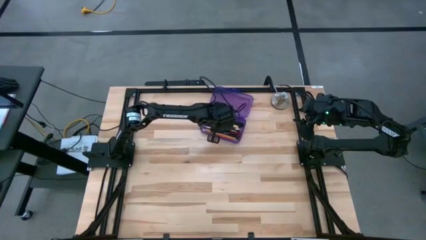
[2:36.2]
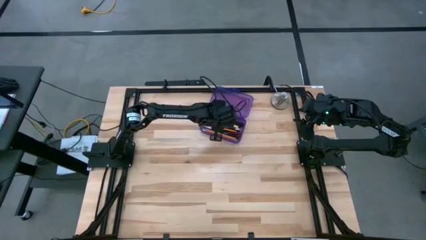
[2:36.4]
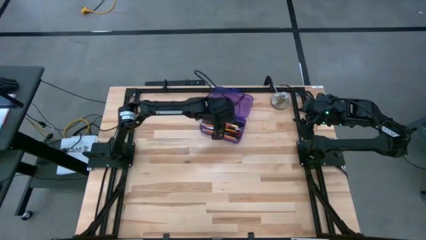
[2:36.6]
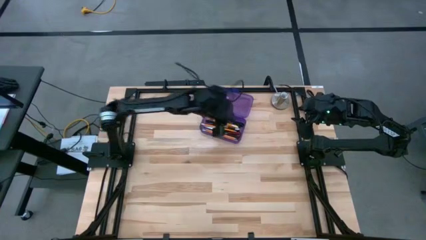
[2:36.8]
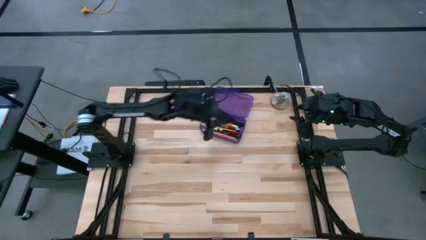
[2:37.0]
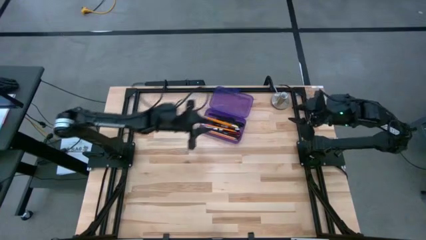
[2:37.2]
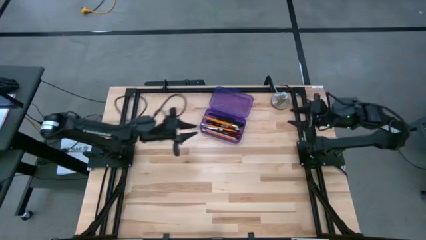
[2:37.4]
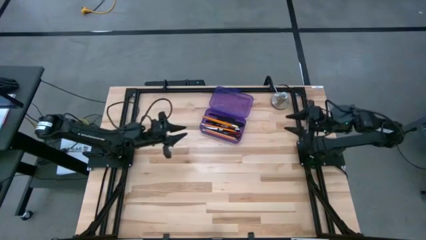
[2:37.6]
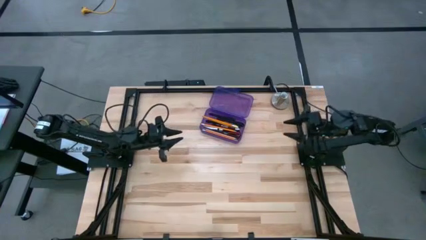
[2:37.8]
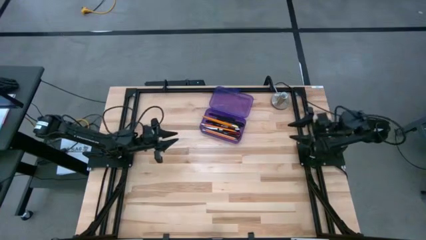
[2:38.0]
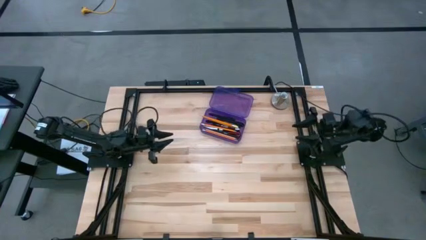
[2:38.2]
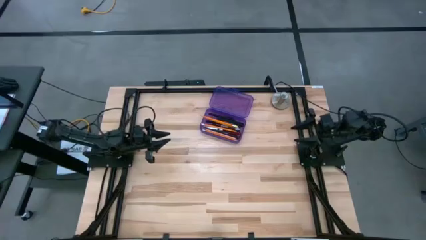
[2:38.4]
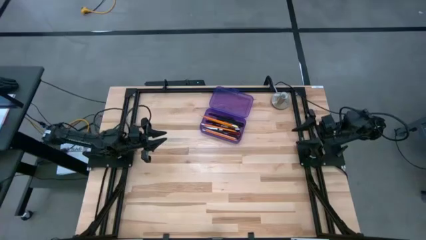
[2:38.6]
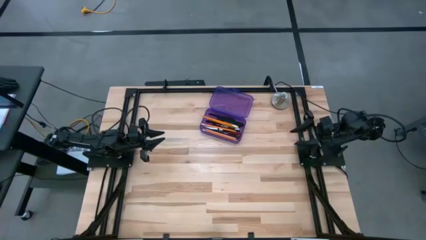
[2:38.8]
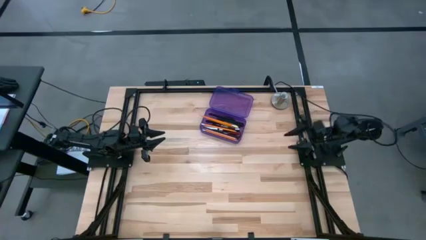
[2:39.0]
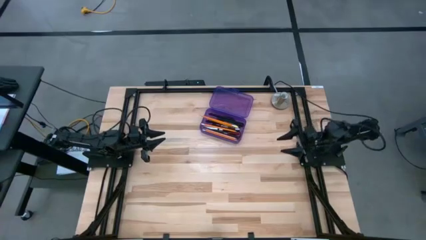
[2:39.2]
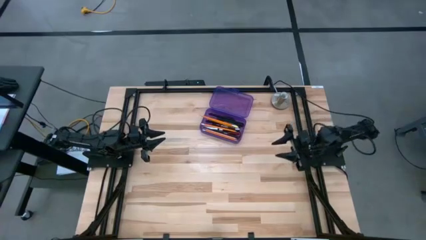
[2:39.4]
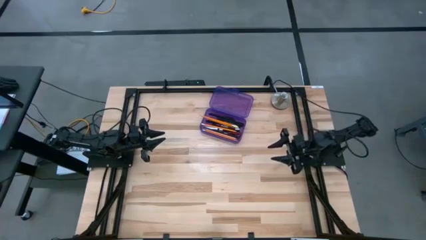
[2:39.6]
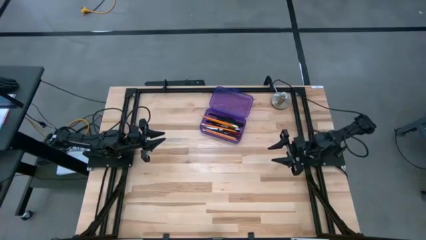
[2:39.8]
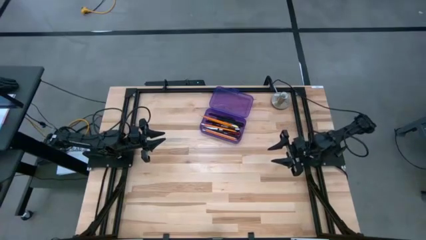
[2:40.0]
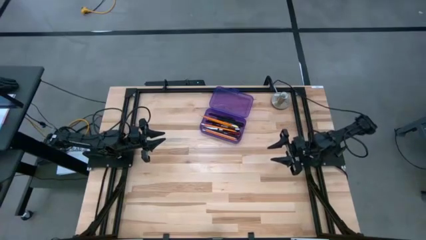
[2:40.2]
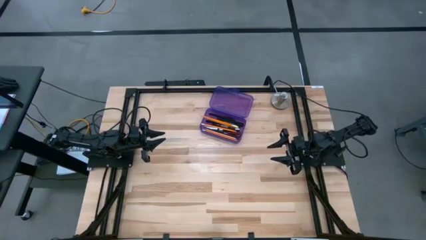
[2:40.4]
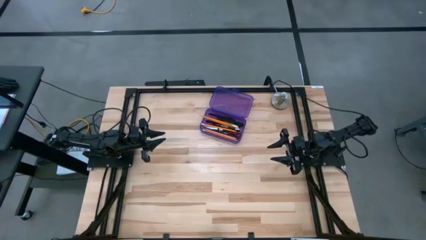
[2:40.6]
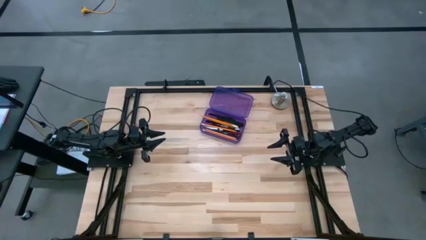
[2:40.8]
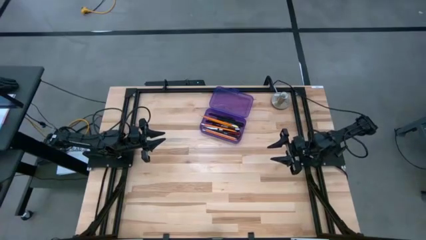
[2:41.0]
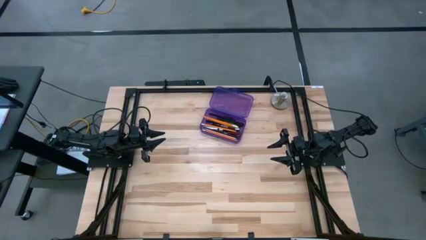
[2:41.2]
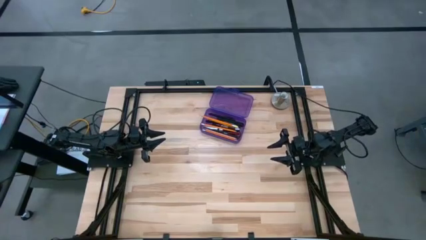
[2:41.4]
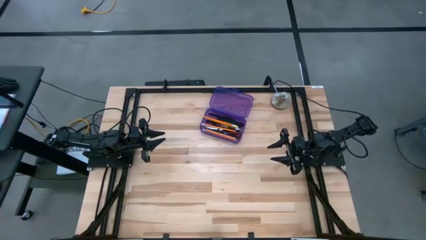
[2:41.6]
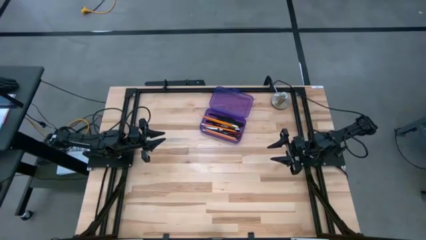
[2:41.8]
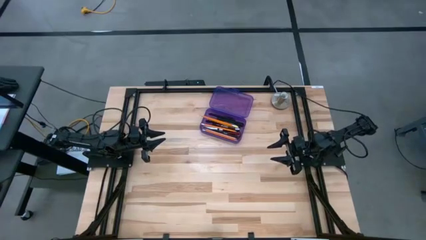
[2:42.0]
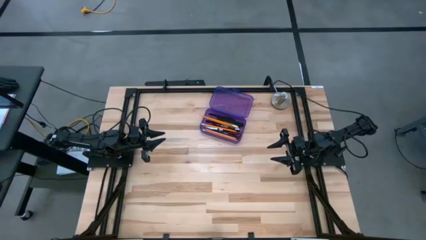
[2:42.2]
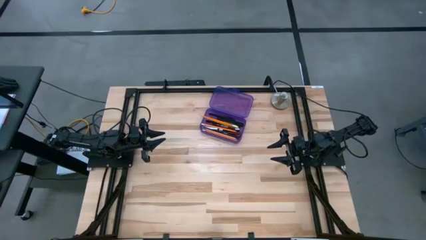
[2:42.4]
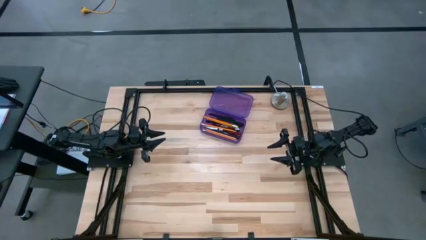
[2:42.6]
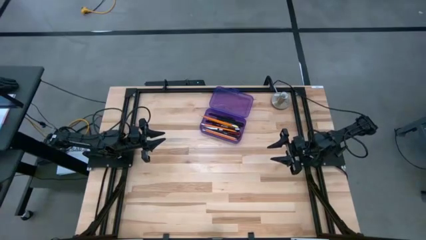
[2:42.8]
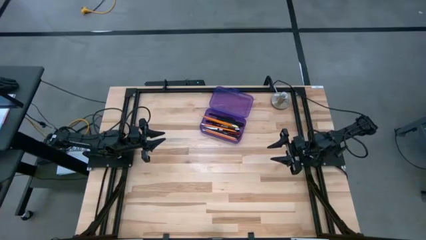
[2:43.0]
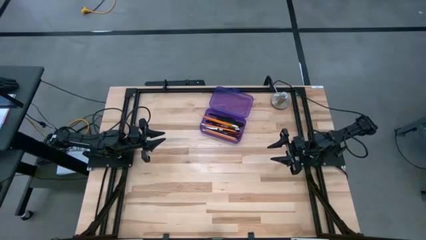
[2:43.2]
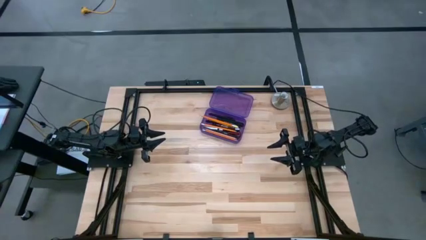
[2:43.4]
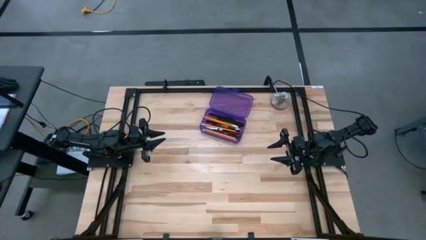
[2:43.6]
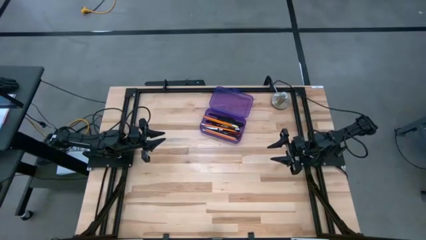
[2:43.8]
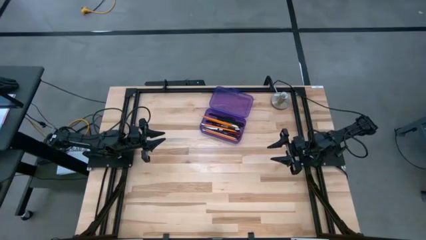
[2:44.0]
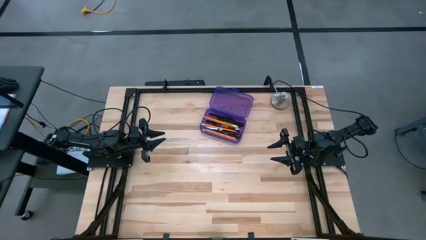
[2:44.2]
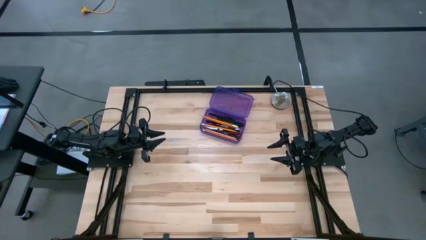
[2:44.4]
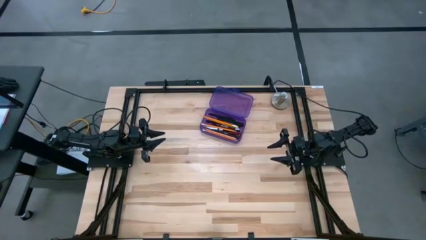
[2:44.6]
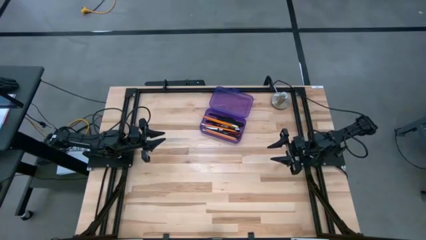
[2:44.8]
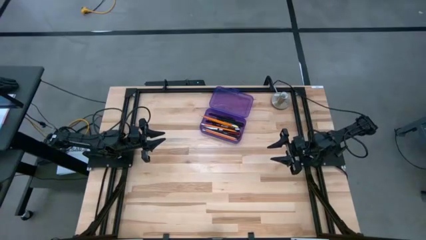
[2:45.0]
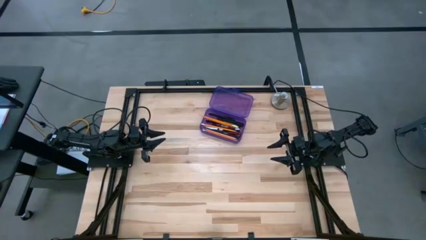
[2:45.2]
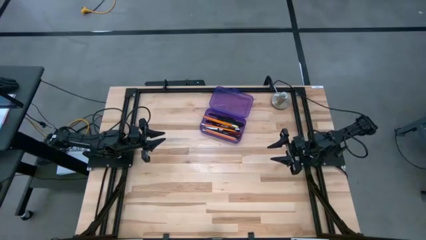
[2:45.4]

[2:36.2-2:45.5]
Task: Pick & place school supplies into a supply box
Return to Home Position

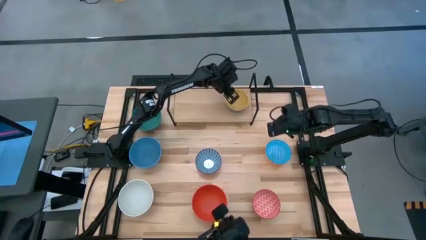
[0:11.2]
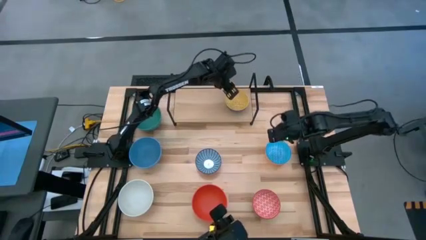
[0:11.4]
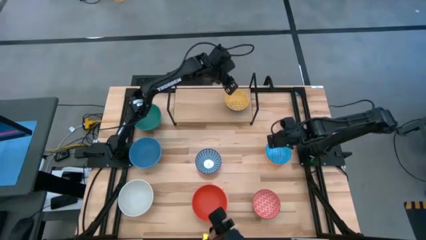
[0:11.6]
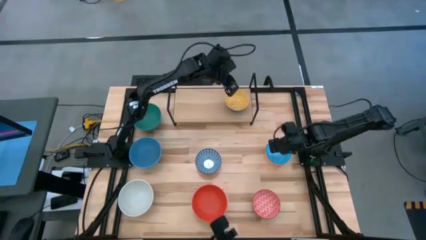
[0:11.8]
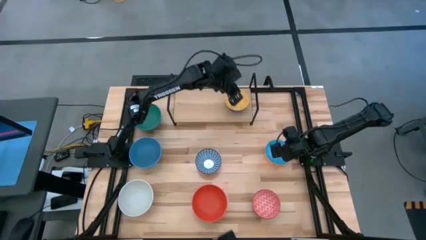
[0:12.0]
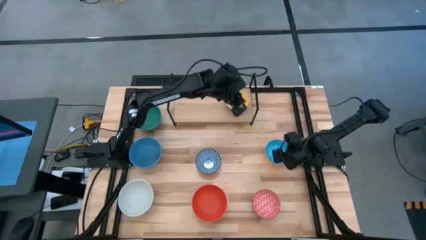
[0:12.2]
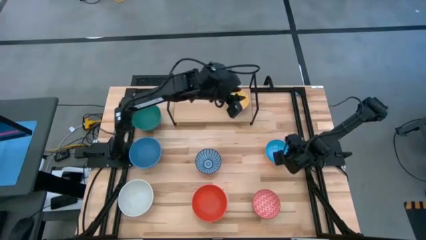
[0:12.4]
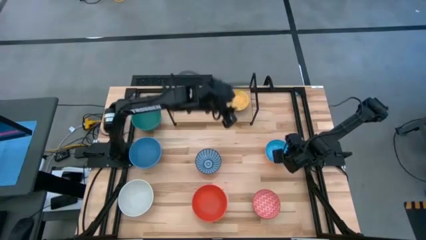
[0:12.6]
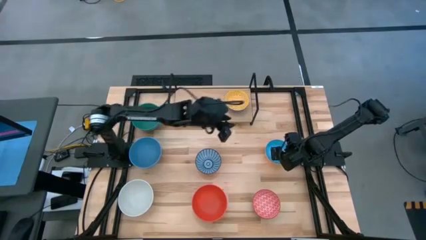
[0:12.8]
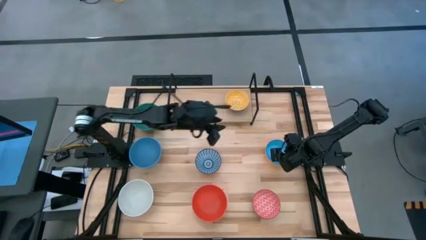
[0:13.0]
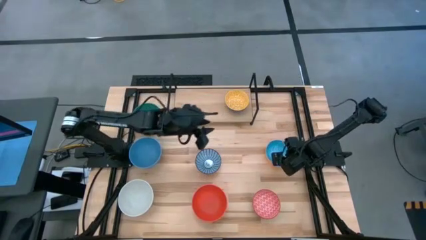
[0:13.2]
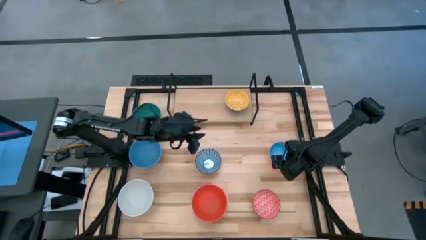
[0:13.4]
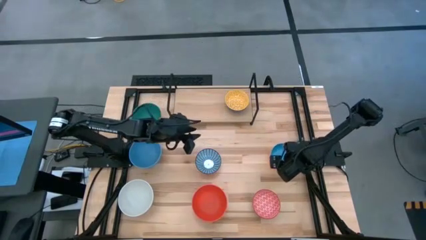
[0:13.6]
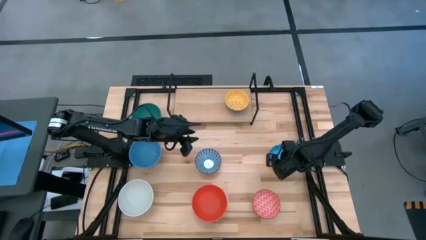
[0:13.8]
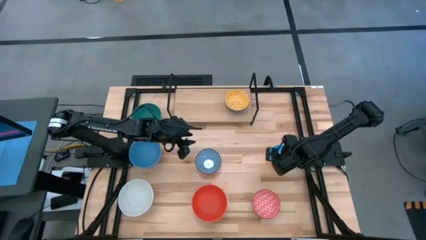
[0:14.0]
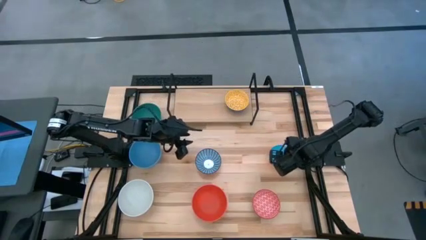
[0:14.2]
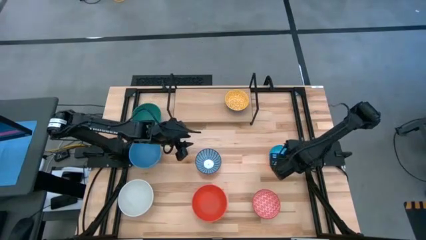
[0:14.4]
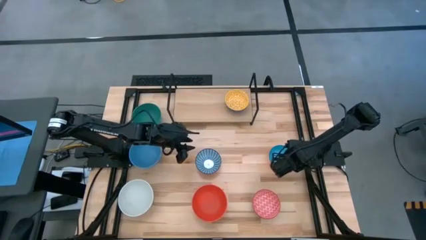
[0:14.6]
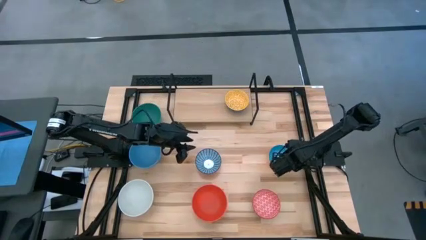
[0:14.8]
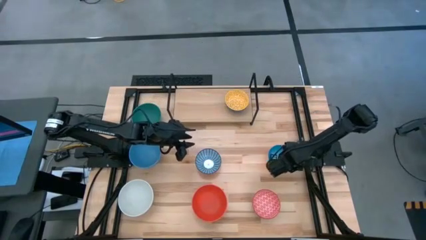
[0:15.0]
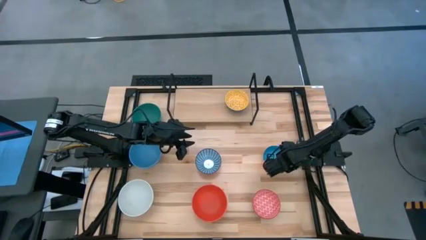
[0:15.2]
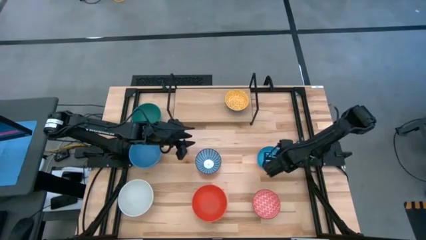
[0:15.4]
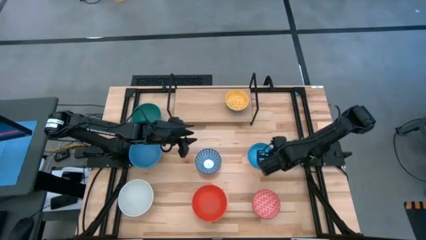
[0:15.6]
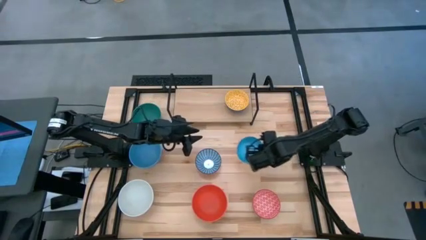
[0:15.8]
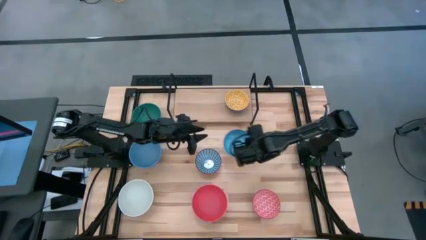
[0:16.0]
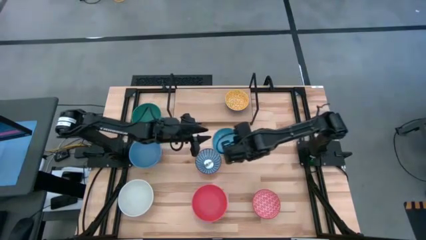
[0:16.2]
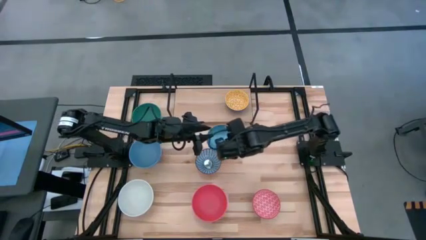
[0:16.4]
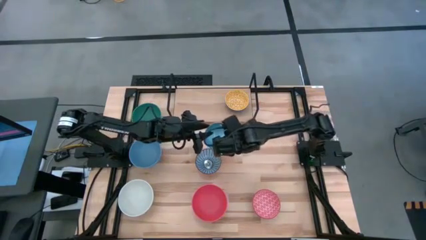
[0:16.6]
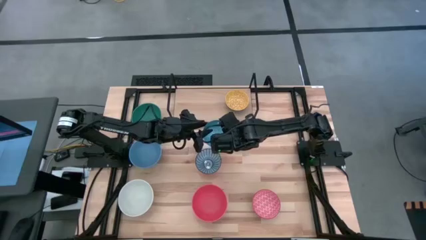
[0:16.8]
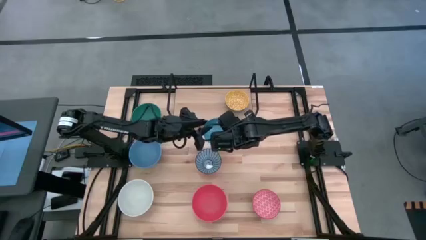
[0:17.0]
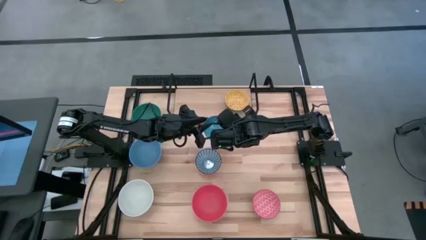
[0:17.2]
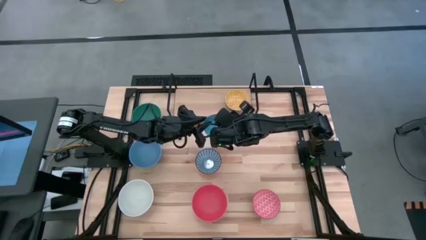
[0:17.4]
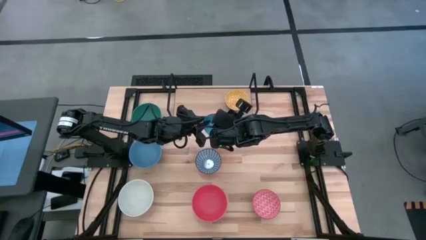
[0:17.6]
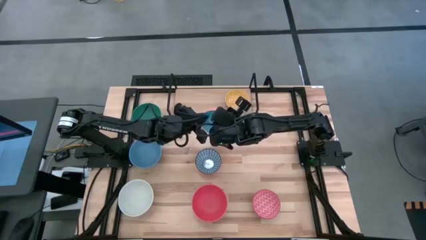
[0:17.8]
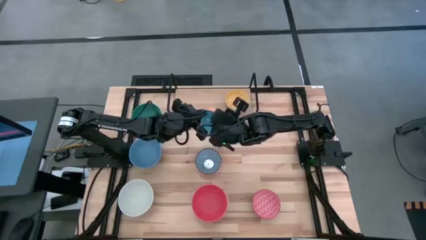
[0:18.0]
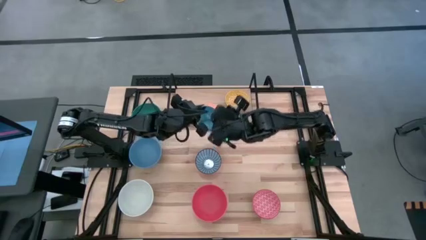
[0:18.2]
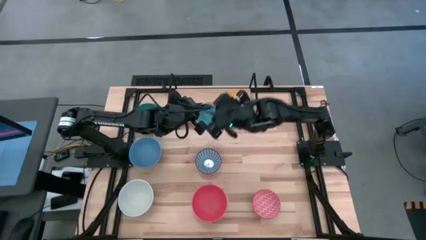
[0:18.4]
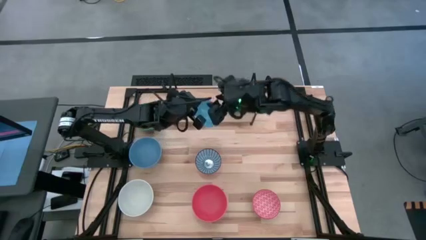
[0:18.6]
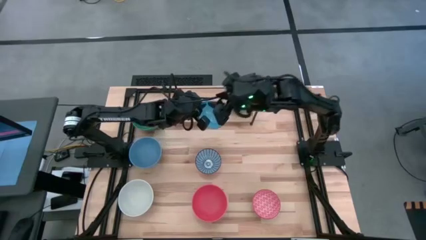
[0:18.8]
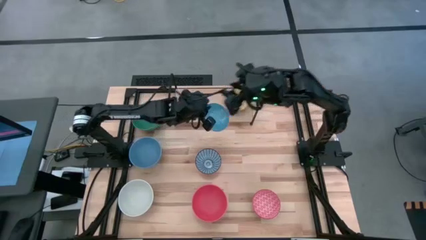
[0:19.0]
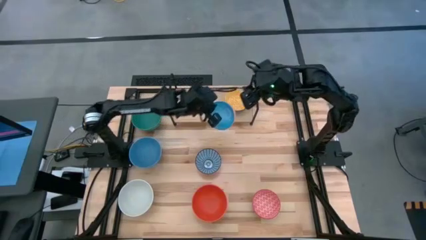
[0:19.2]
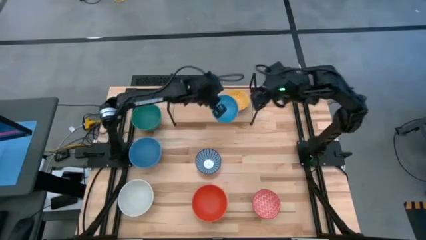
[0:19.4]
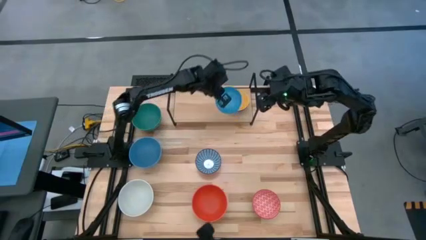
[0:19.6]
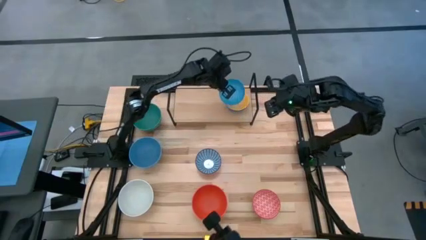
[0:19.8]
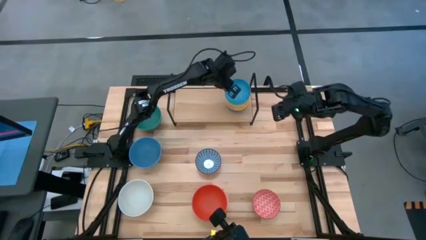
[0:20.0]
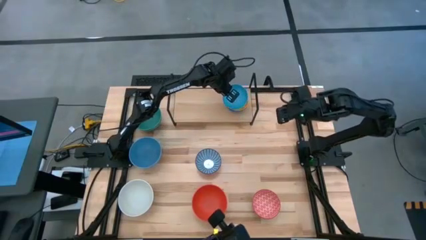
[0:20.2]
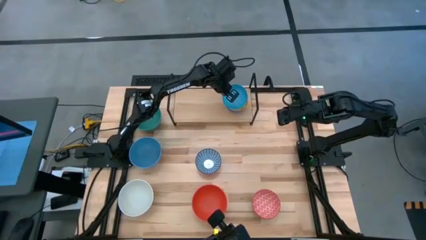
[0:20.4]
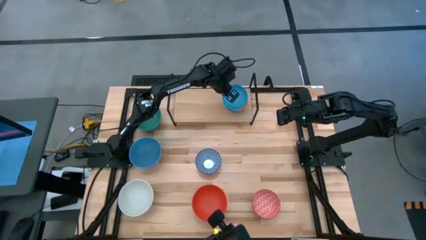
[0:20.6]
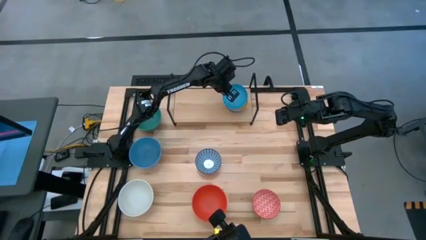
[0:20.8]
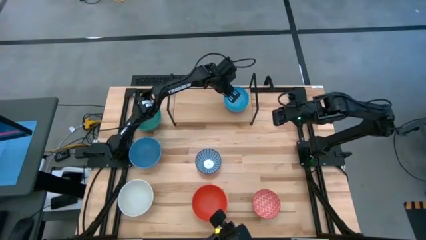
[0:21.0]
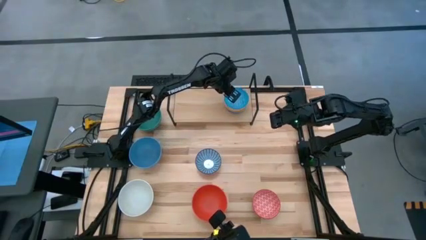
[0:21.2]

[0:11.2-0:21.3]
Task: Place and stack bowls onto a shelf
Stack the blue patterned bowl on top of the yellow patterned bowl on the shelf
